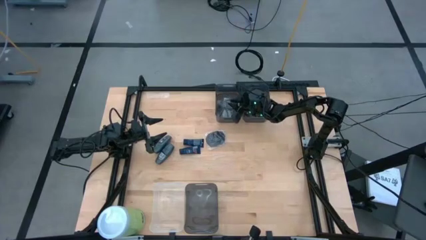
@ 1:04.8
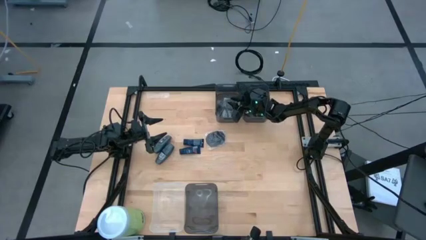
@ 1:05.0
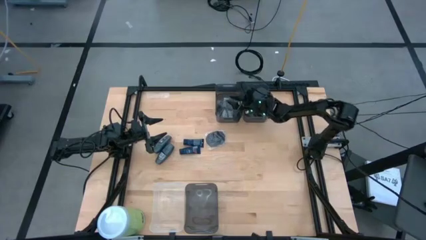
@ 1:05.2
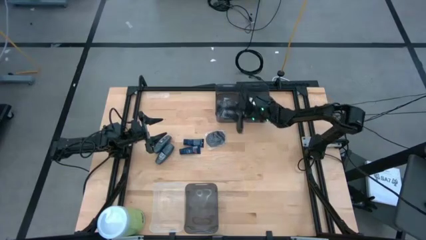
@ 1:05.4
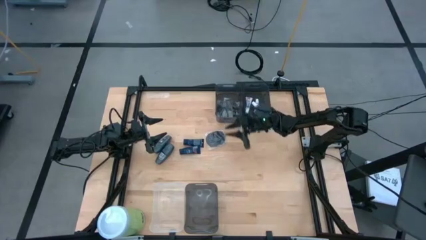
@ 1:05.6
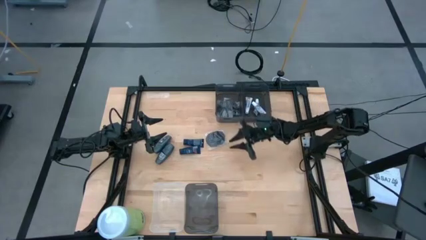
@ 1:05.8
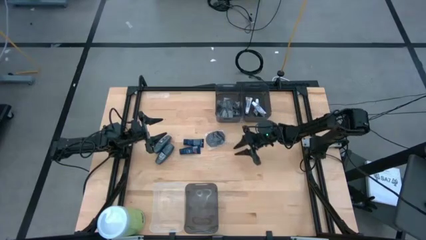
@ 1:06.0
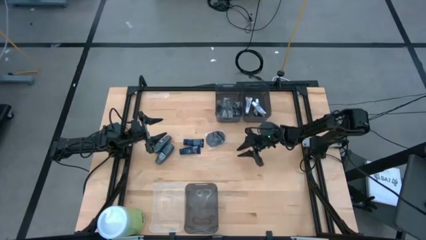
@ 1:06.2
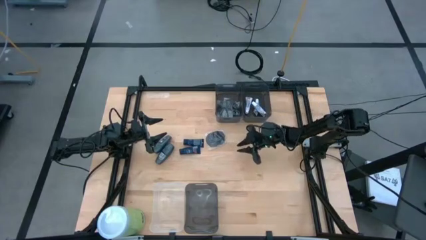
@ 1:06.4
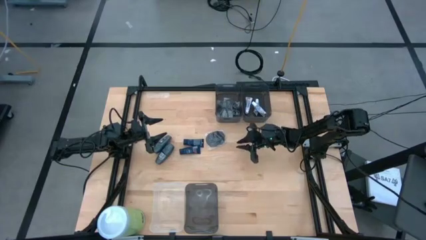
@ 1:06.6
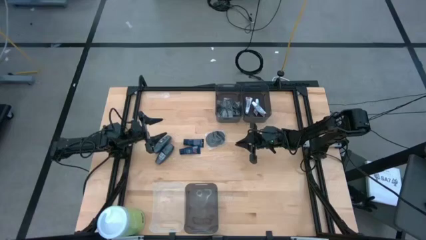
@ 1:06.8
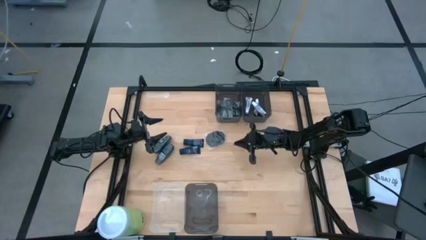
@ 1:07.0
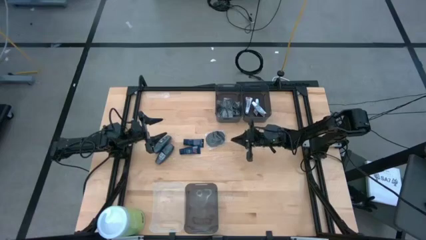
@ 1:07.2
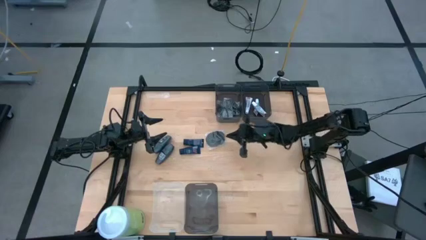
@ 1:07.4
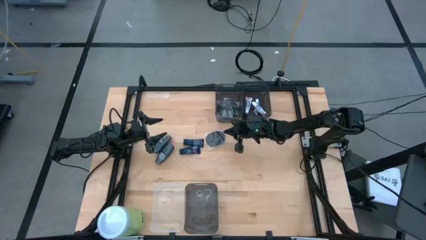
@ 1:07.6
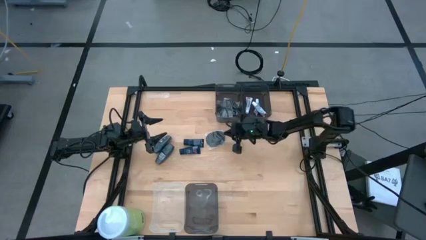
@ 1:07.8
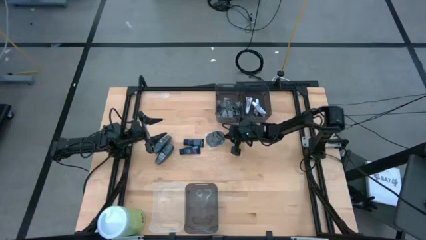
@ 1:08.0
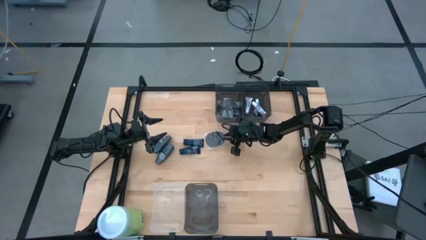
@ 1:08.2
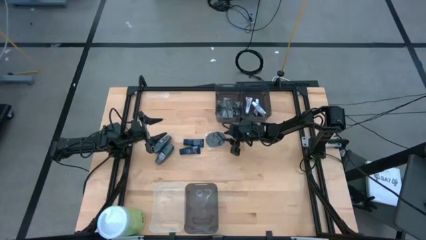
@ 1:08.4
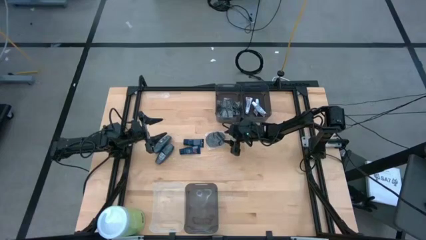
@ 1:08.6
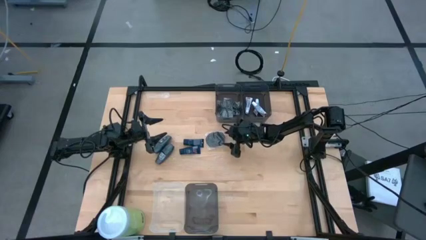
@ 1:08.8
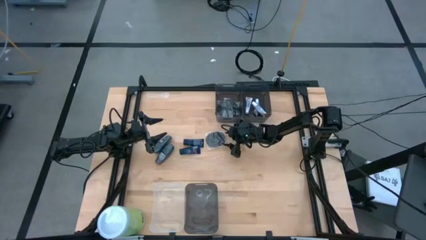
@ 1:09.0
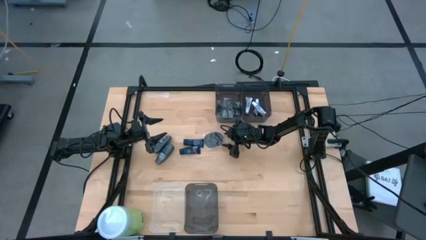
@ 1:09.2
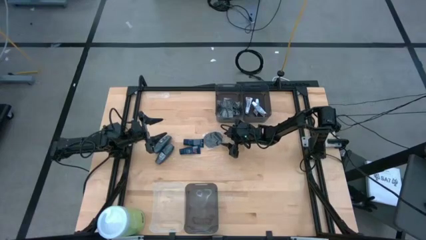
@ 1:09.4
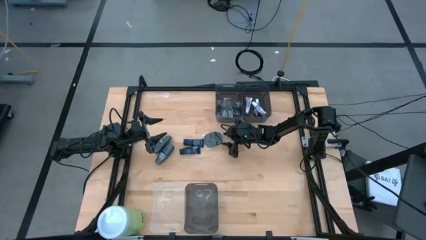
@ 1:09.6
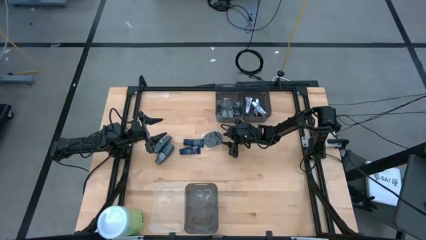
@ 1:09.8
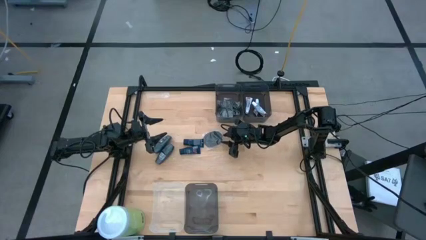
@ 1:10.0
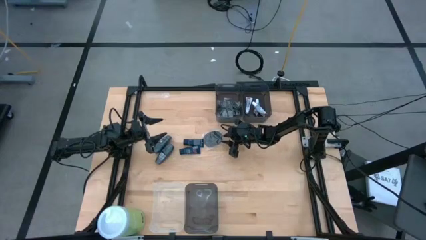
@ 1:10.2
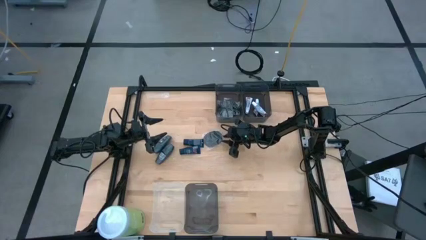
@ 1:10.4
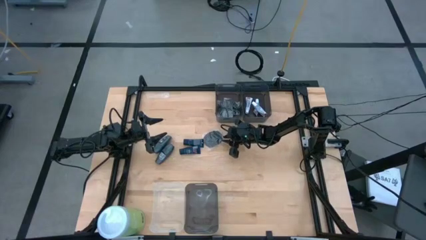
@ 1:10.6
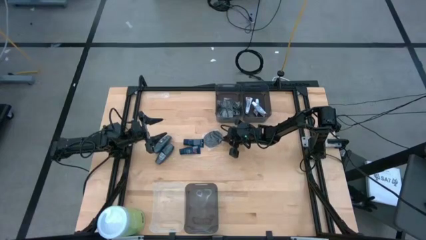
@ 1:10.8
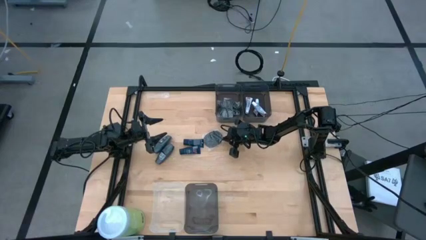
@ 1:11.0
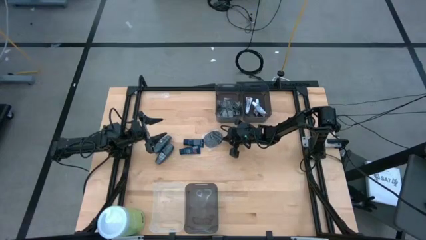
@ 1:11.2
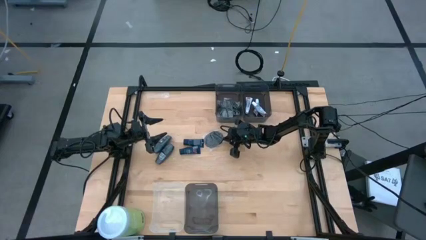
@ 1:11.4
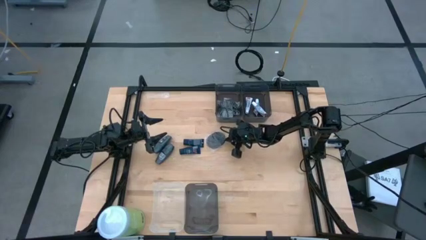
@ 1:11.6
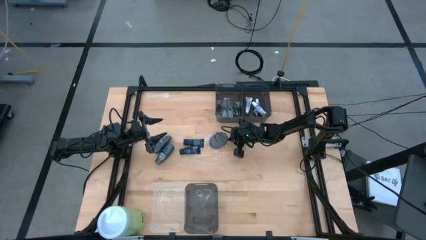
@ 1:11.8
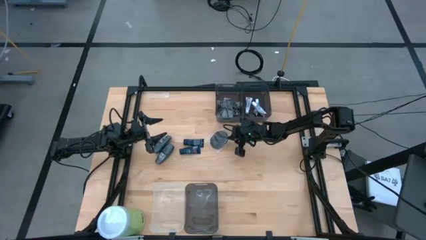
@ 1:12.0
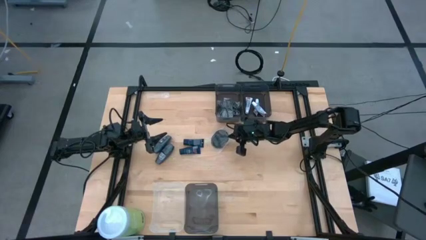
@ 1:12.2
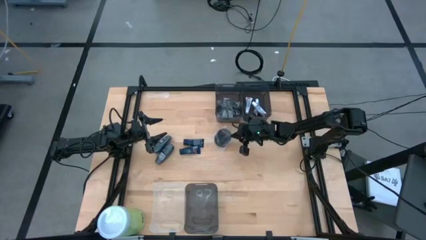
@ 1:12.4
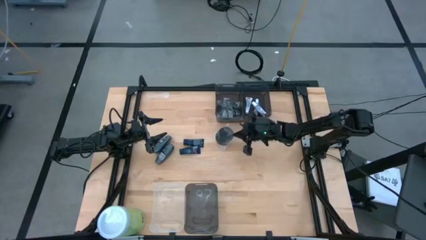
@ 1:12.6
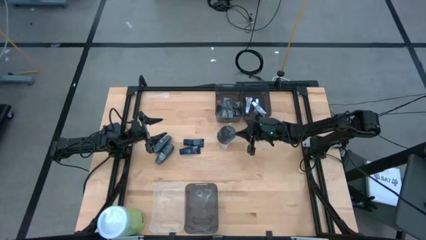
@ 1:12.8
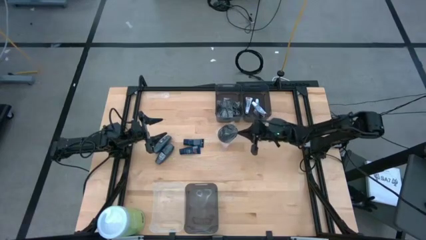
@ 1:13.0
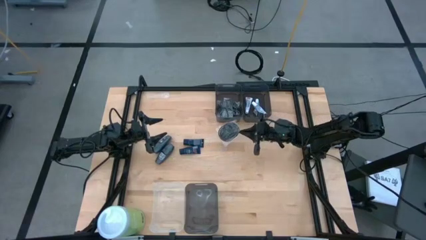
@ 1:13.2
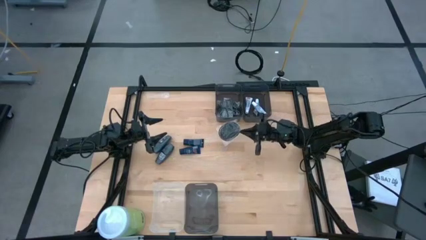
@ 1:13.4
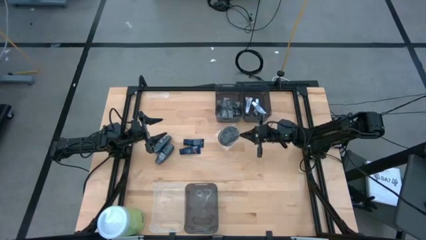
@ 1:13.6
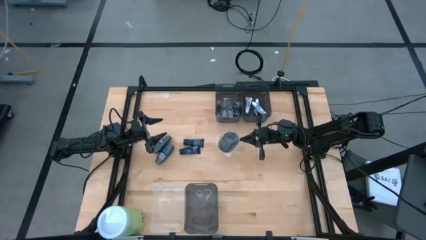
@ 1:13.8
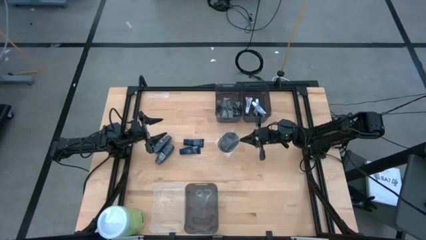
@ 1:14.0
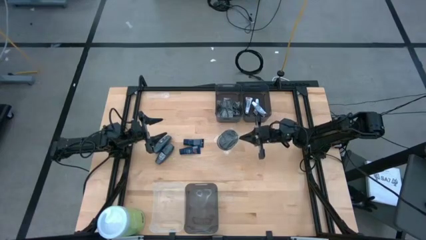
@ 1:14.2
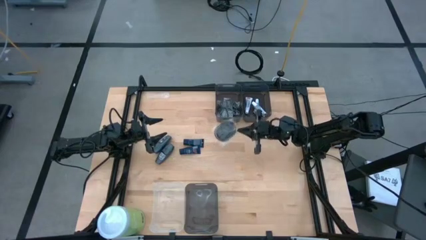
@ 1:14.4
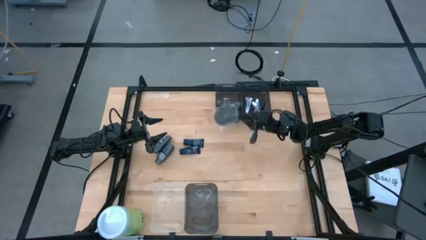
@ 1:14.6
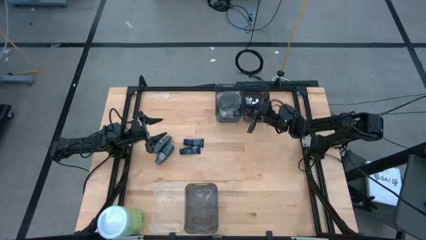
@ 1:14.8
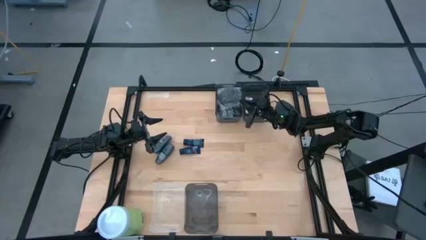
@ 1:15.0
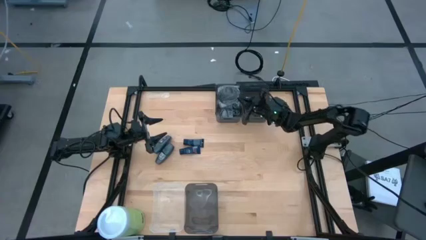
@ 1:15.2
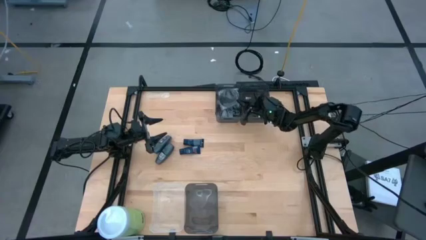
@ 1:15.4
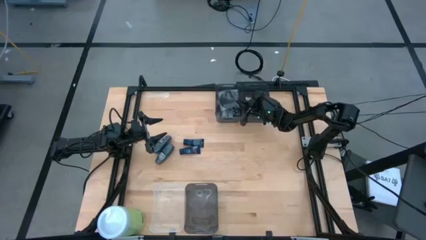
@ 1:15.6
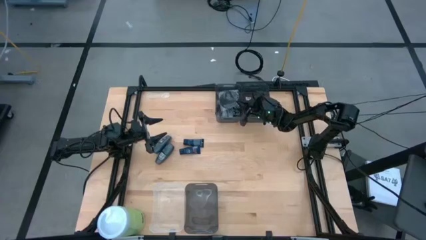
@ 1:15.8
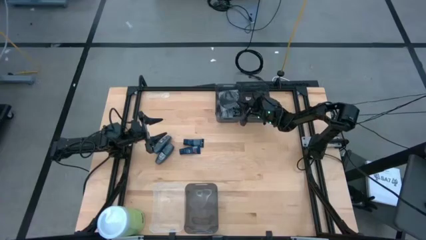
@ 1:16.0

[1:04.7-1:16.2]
Task: Pick & Place Travel size toiletries
Put the black hairbrush into the top left black bin

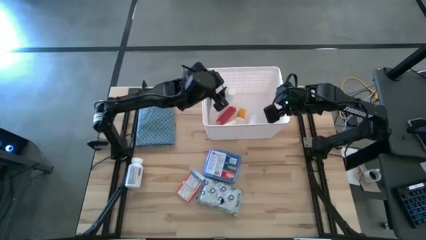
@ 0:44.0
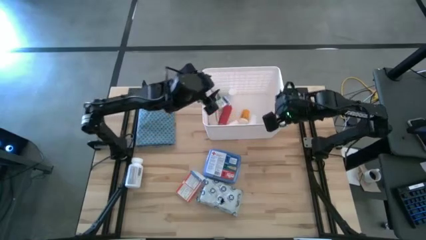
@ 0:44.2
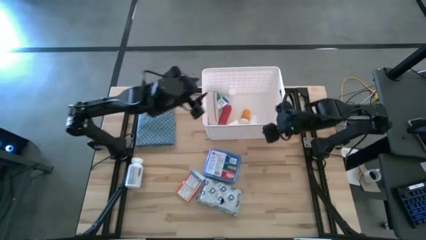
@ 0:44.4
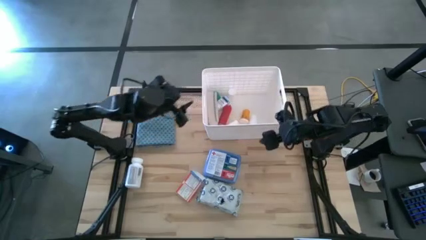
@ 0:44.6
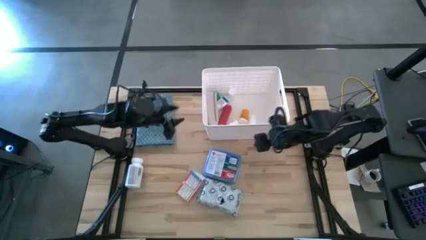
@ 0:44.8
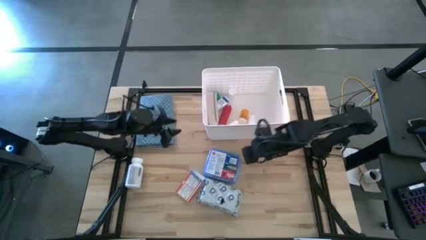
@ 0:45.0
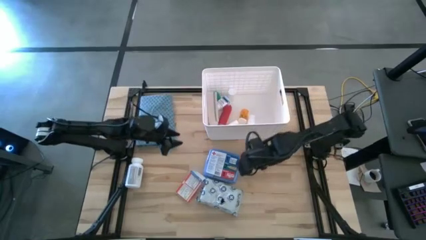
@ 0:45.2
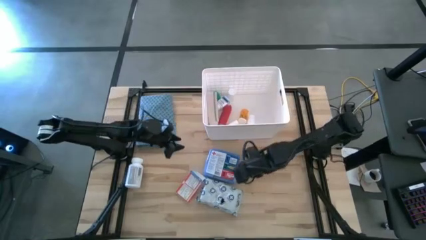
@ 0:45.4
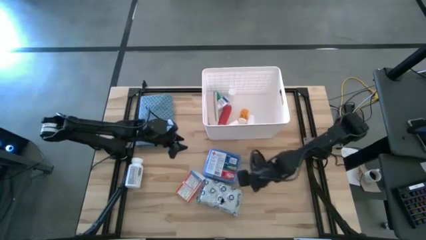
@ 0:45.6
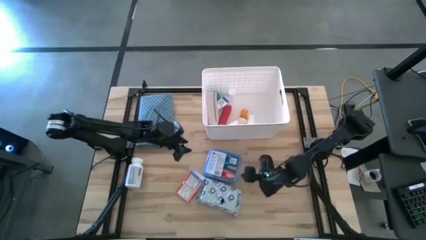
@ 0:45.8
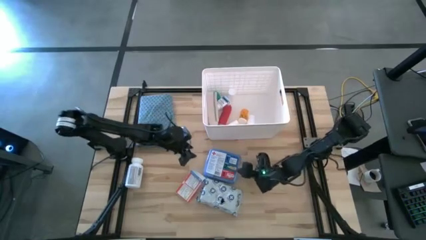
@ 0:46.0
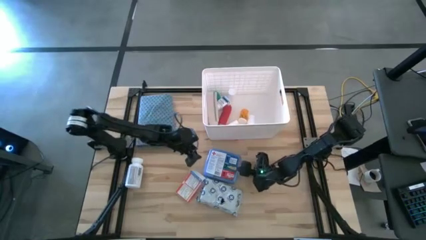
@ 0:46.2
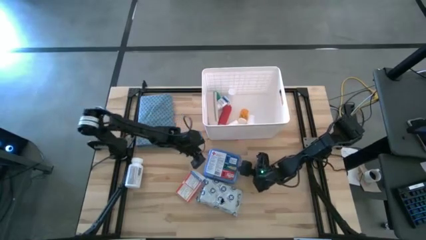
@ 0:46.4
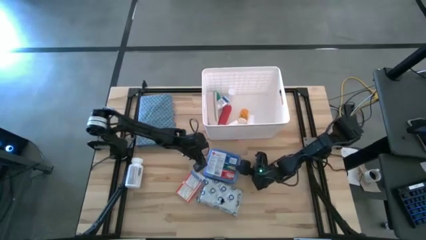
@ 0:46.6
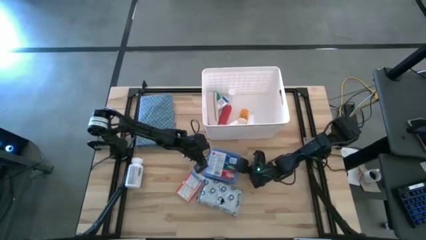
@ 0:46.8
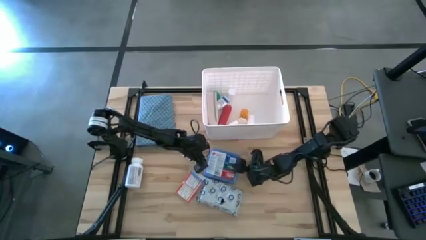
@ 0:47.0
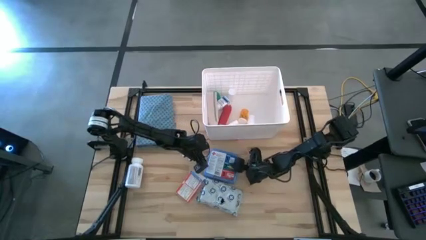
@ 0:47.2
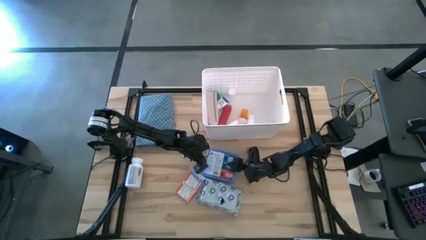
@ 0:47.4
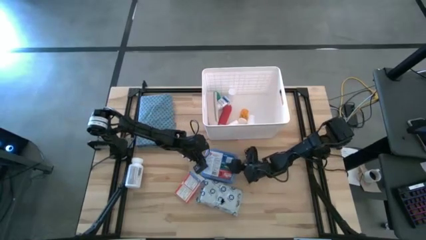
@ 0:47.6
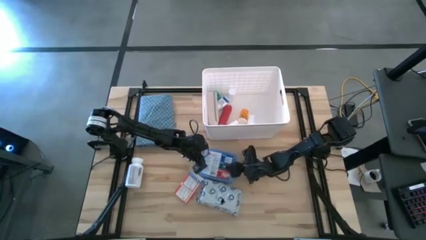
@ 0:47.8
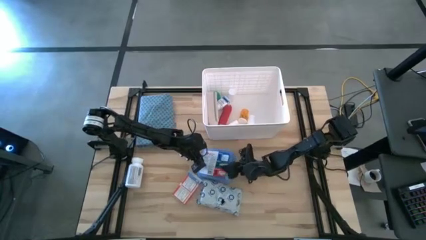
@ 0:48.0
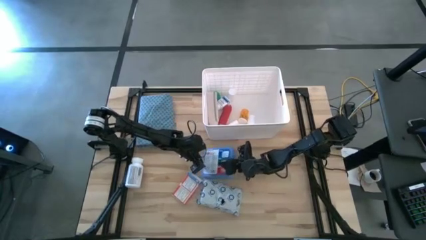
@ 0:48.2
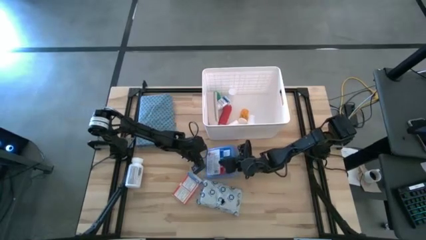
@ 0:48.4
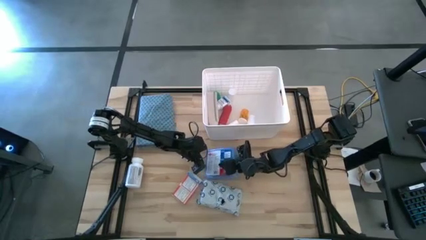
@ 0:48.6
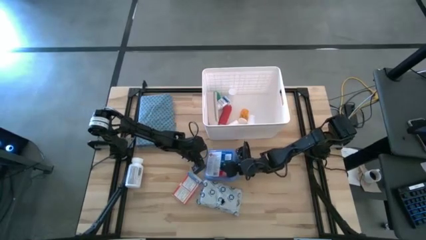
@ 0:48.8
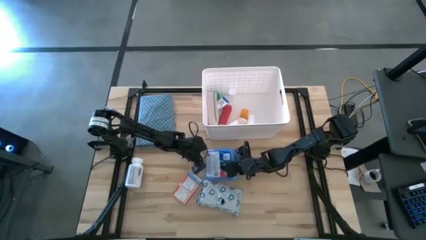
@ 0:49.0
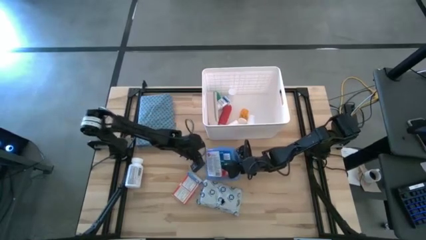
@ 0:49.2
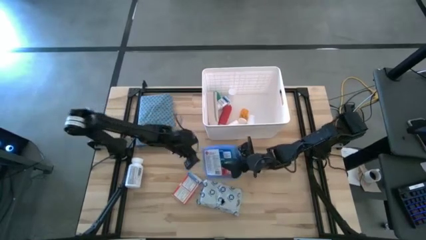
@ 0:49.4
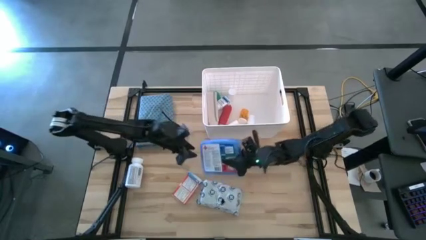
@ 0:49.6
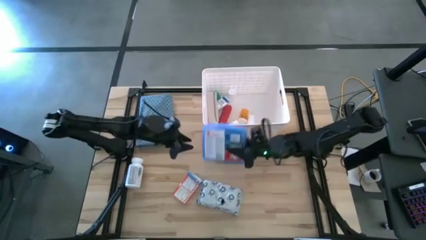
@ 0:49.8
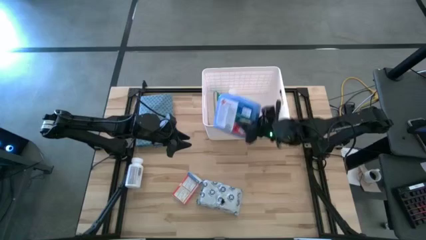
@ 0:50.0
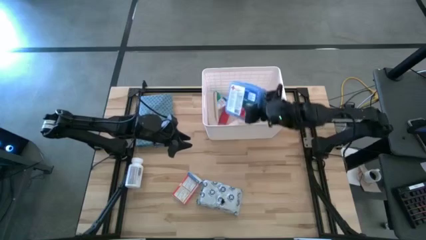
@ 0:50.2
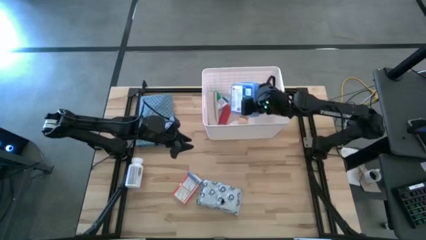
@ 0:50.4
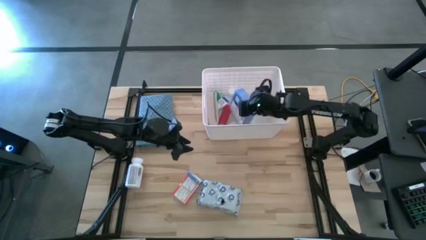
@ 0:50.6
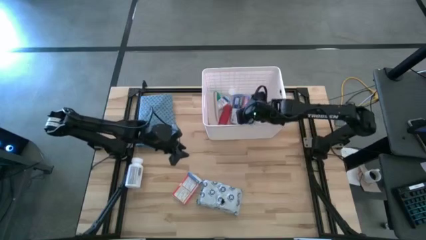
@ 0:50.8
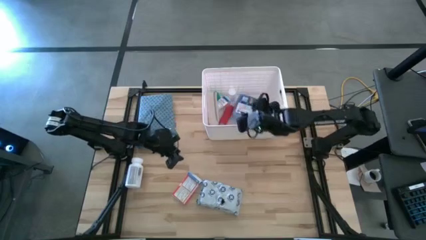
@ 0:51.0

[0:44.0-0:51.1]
Task: Pick & place medical supplies in basket/bin
Put the blue first aid kit into the white bin
